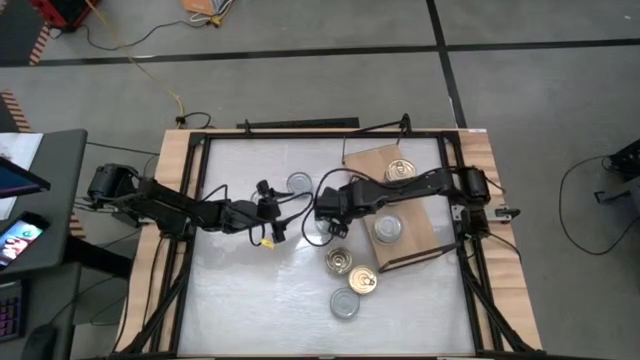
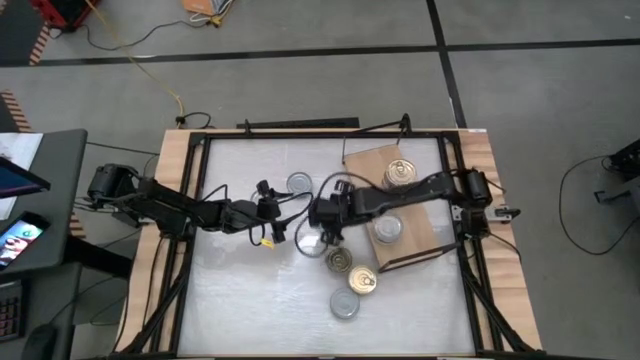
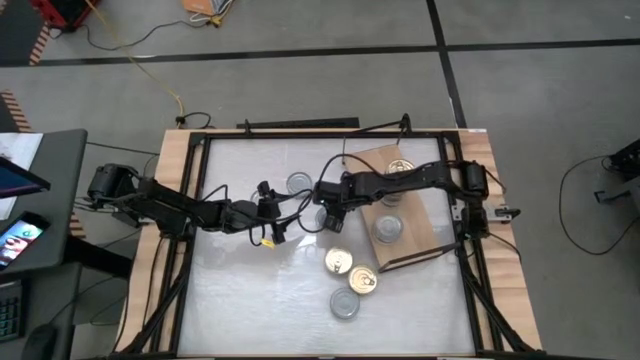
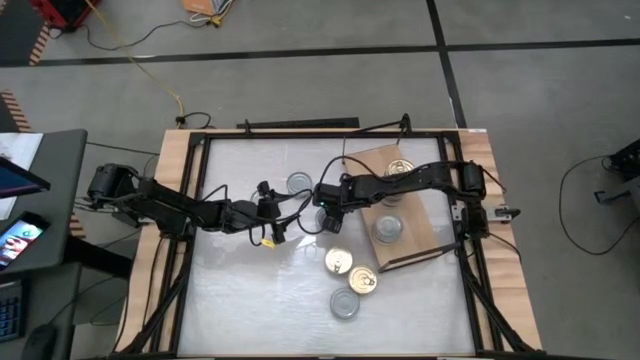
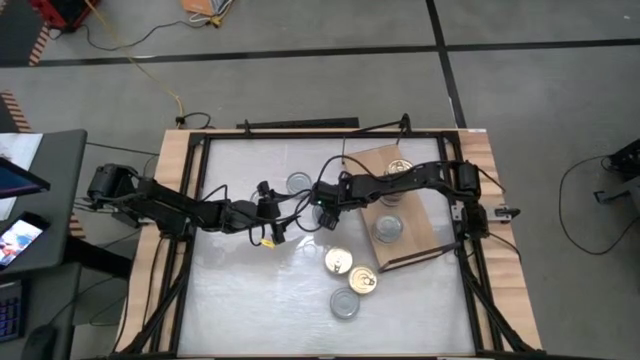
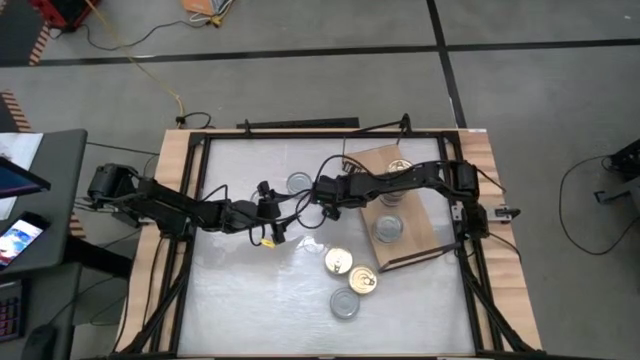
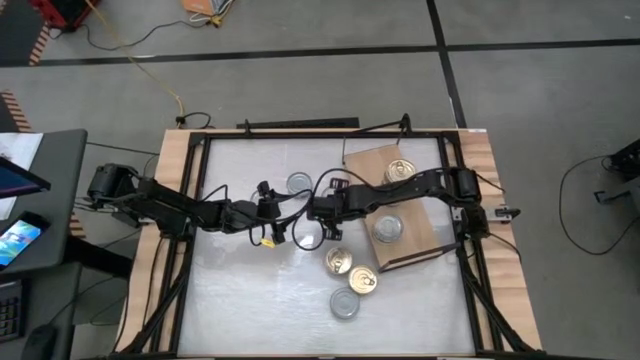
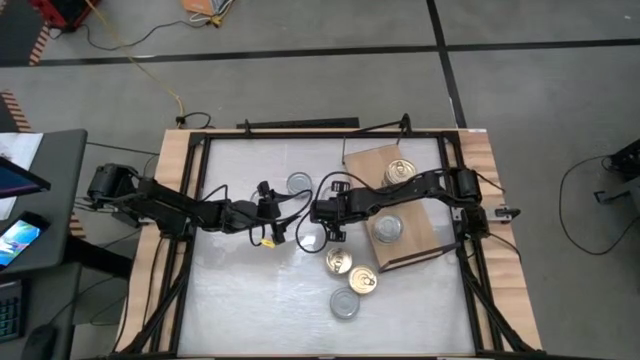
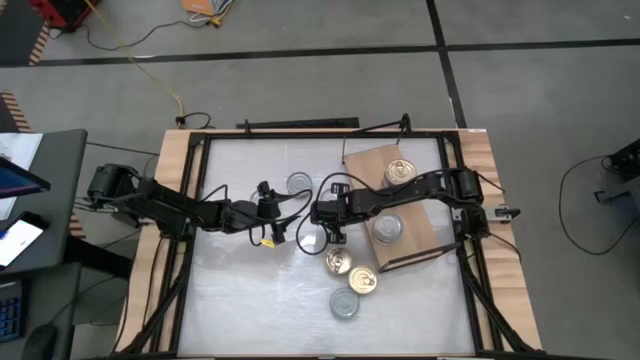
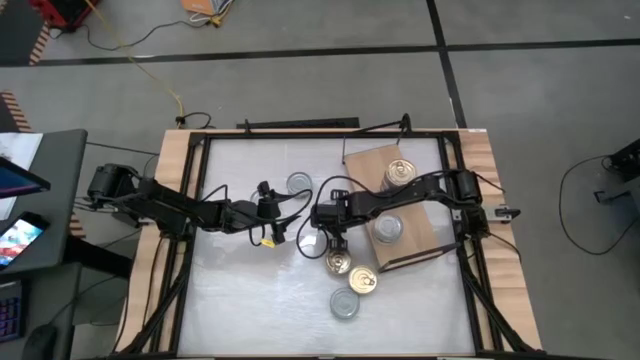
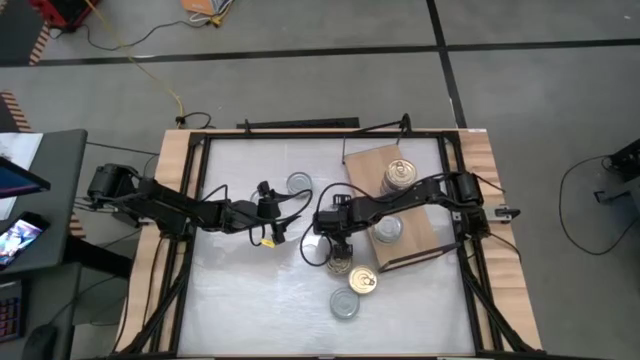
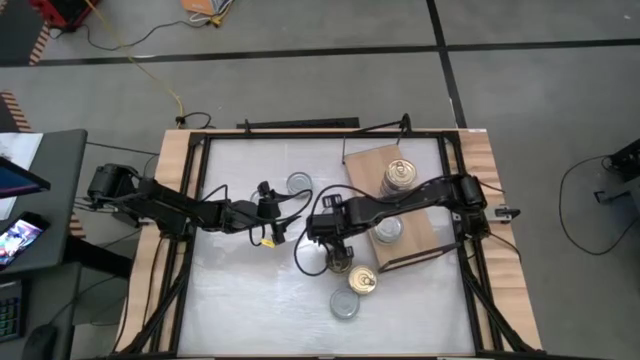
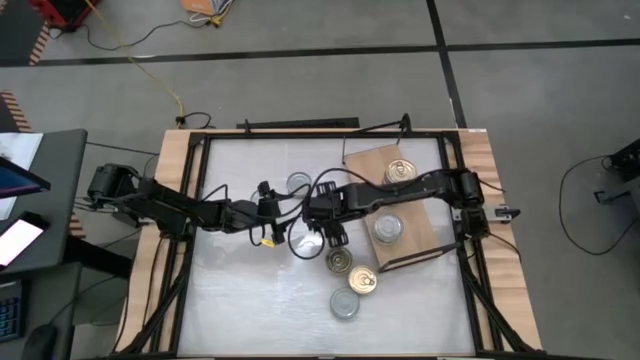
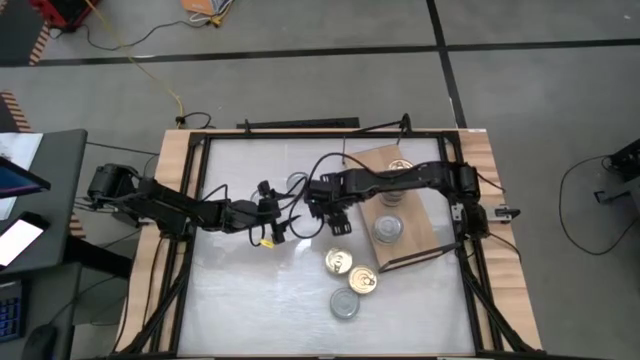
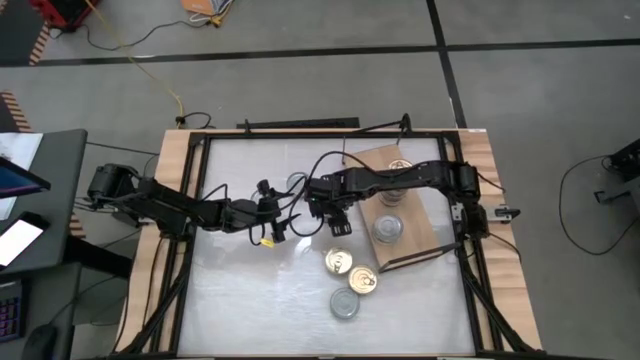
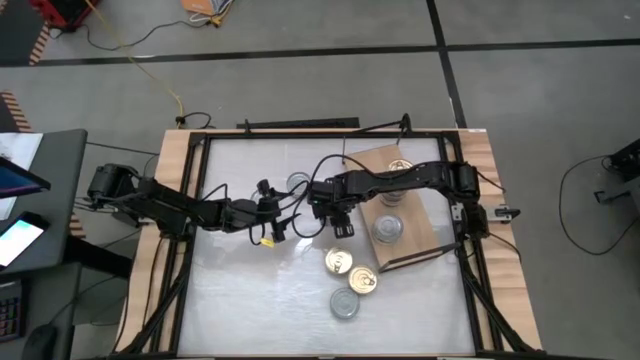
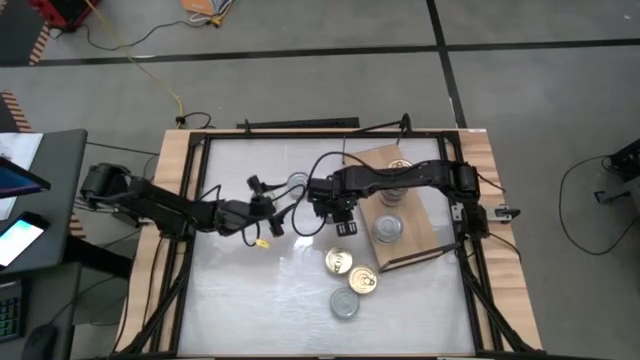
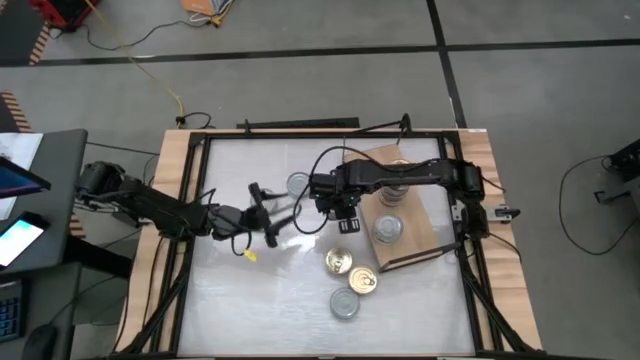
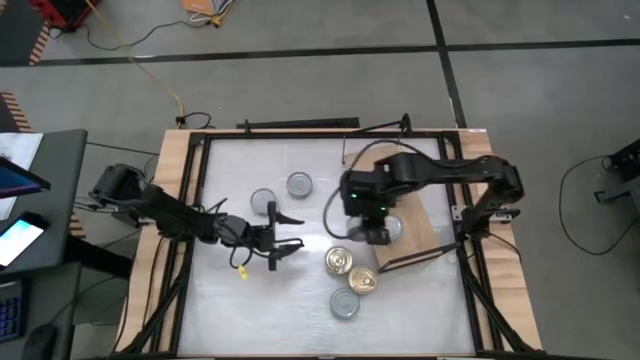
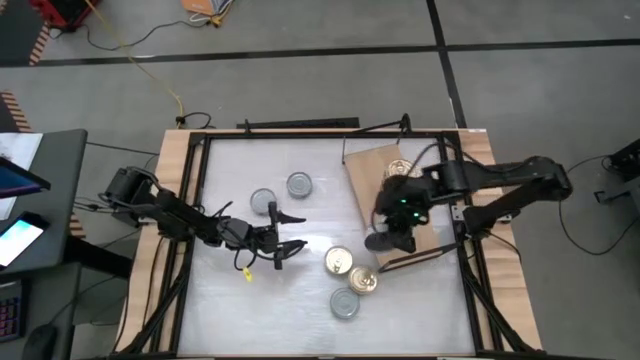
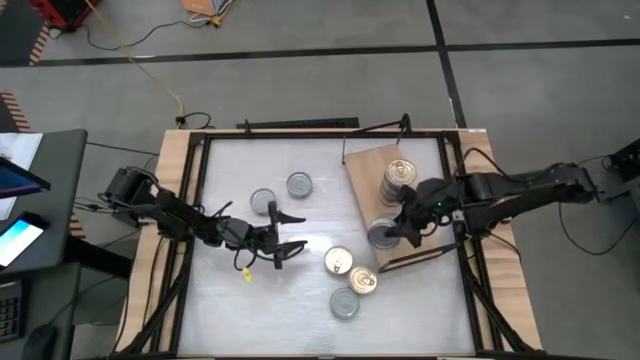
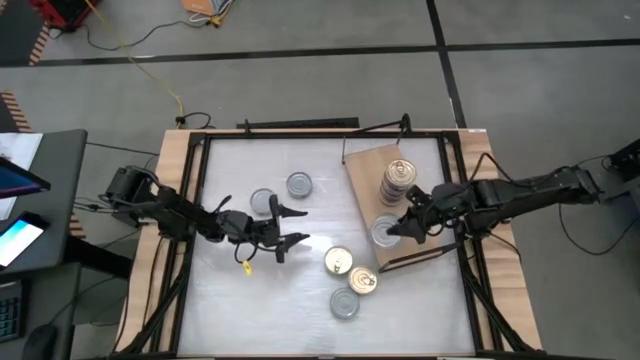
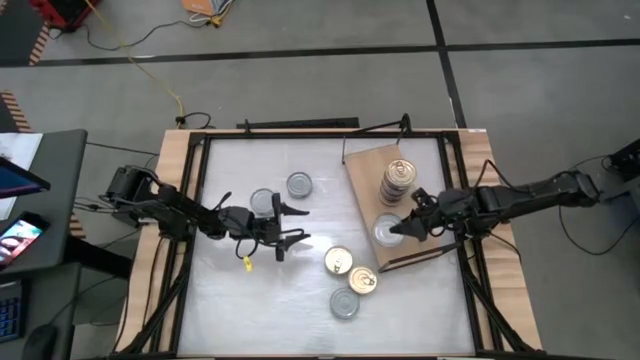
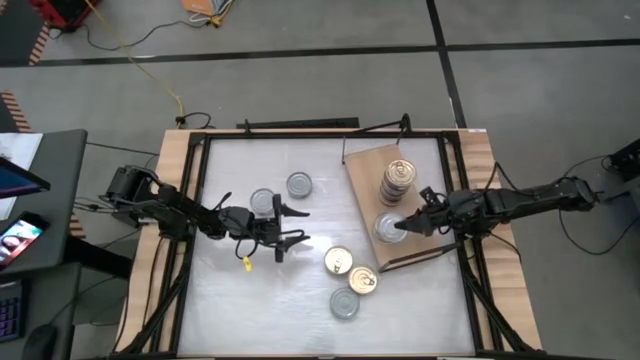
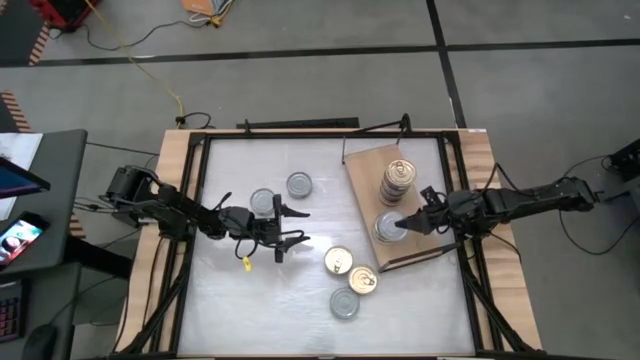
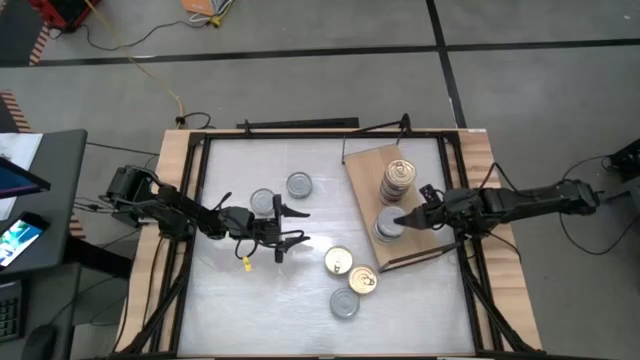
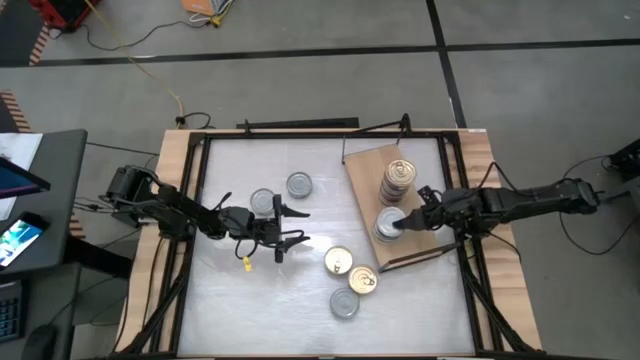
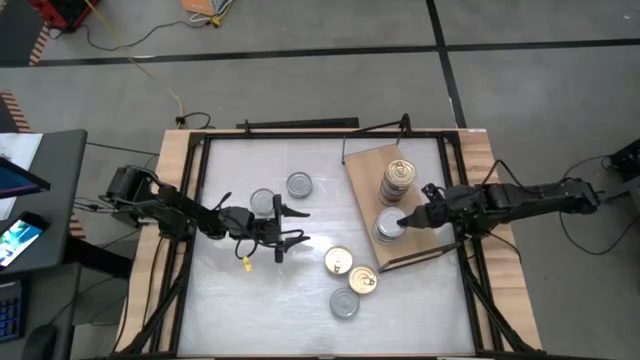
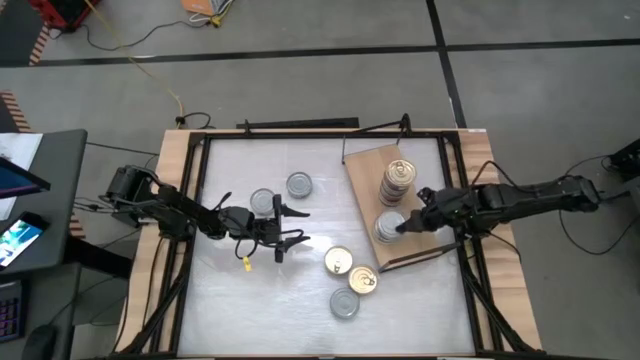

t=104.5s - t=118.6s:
Task: Stack canned seafood by type on shelf
Stack the green tuna can on the green tuna can on the shelf

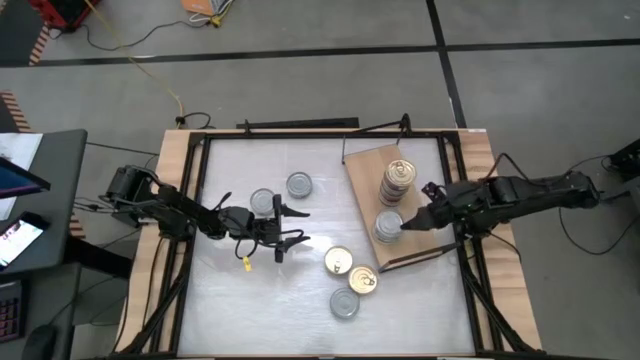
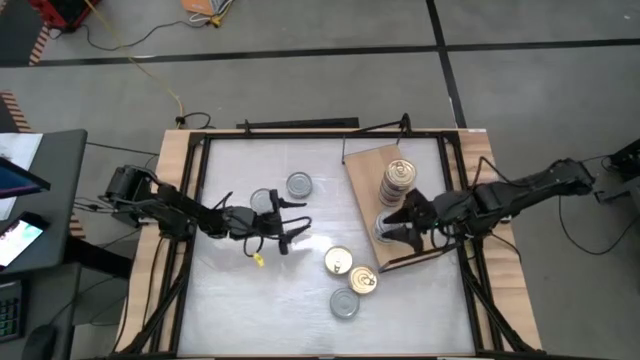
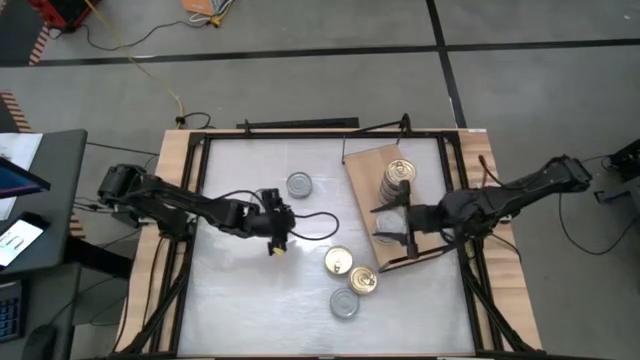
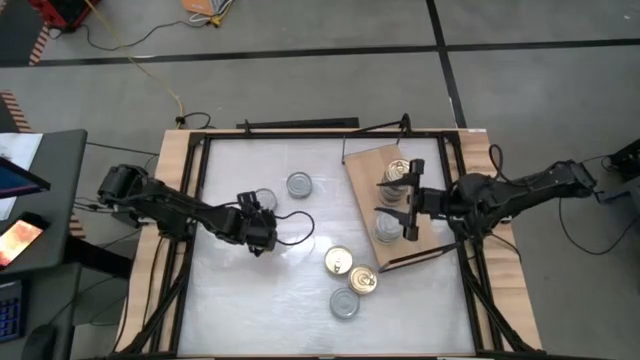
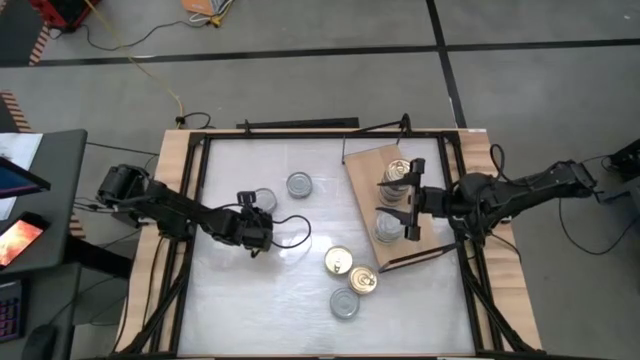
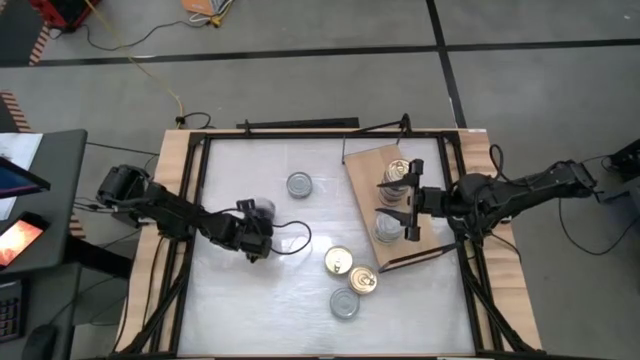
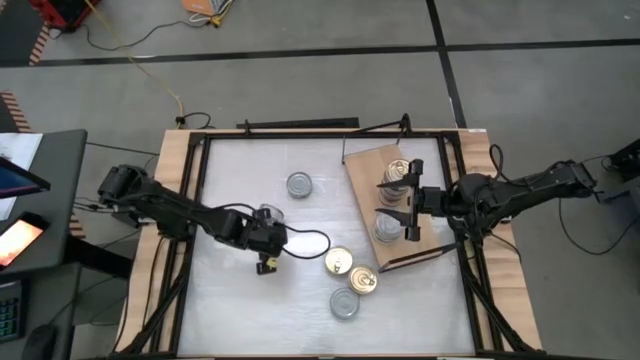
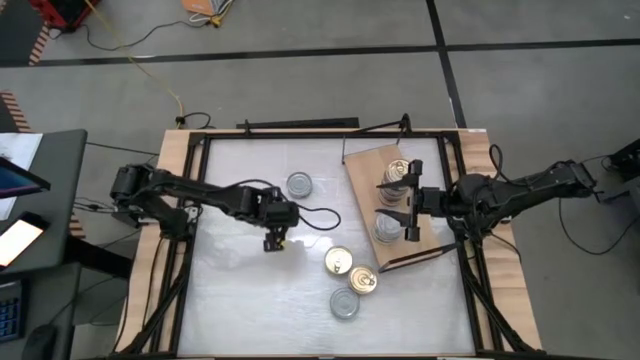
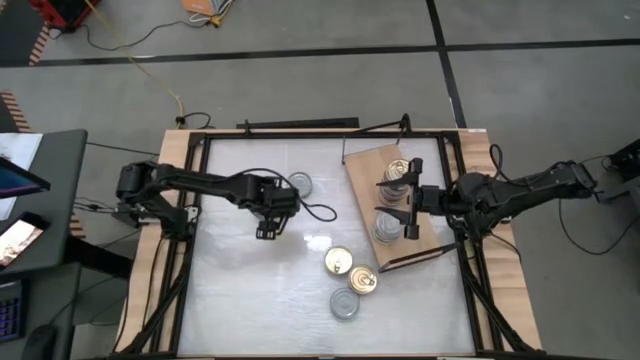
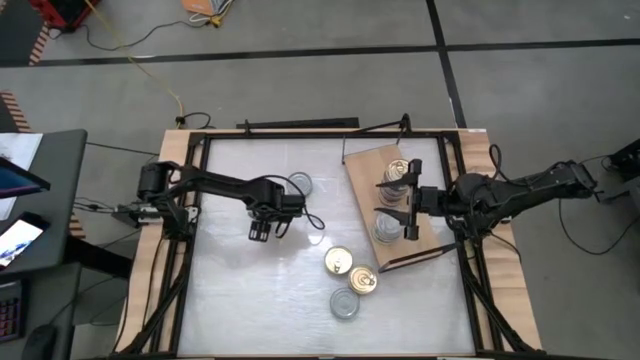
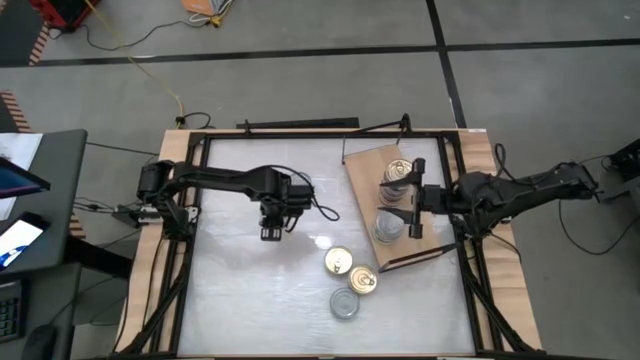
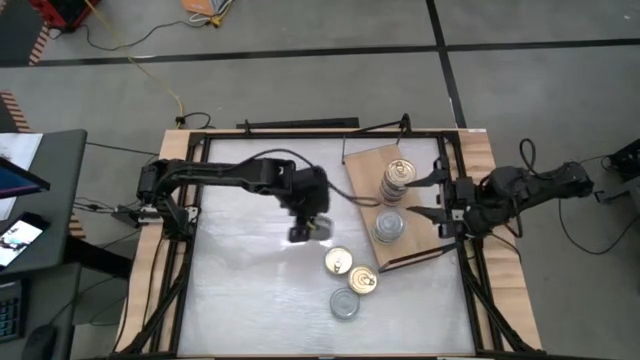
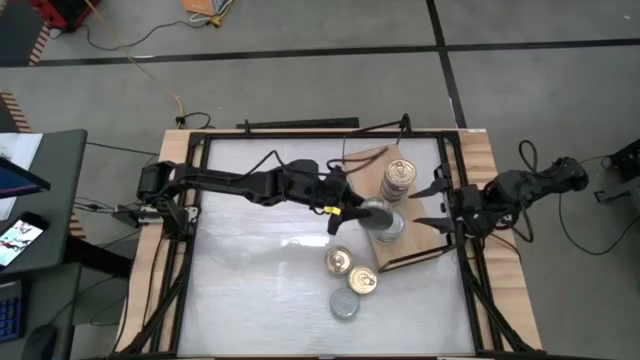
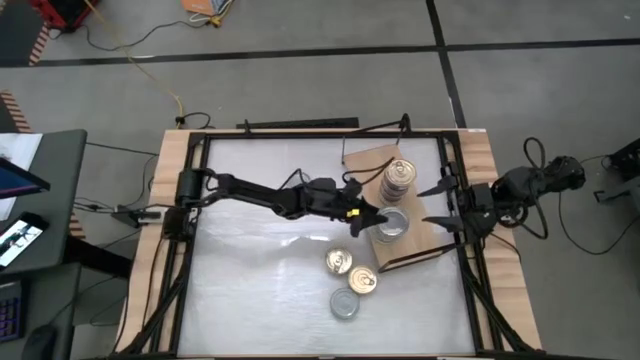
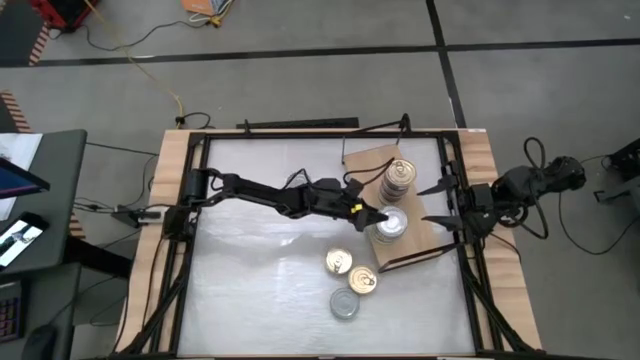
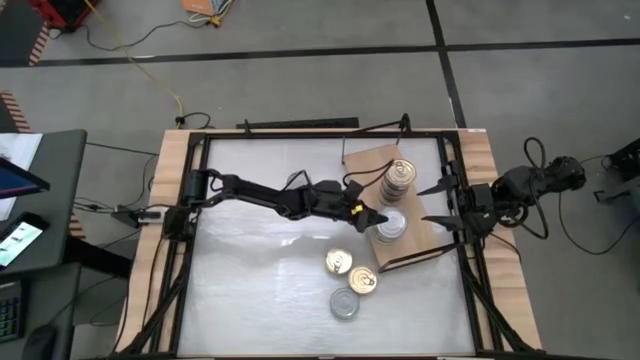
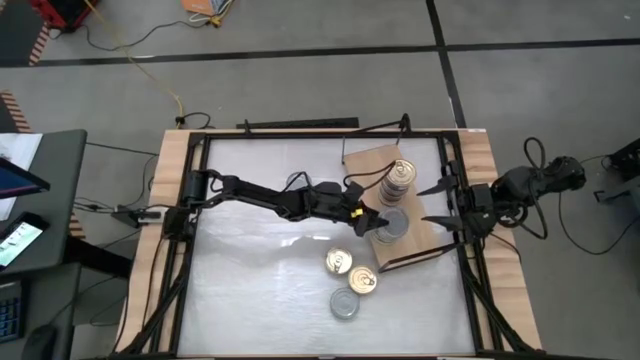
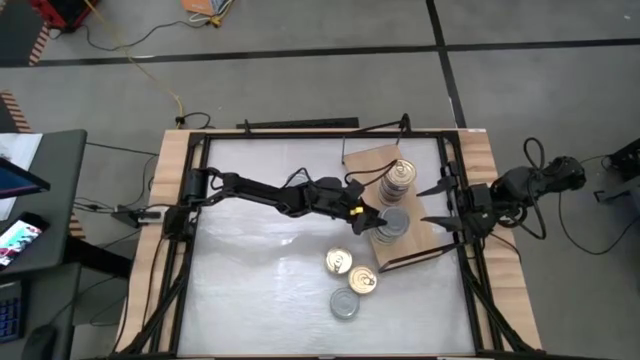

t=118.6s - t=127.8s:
Stack the green tuna can on the green tuna can on the shelf
